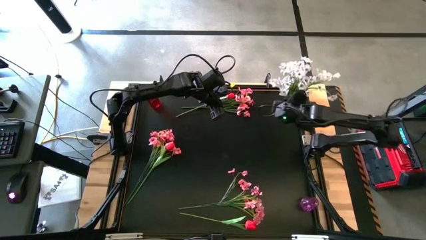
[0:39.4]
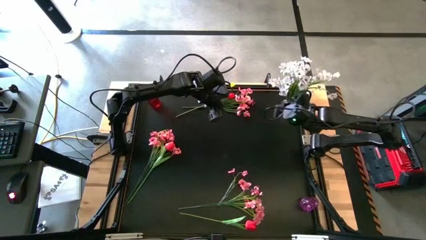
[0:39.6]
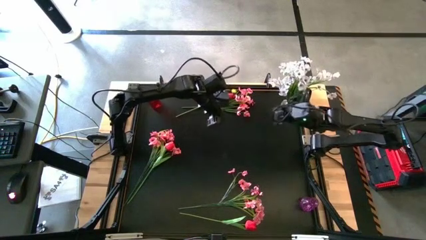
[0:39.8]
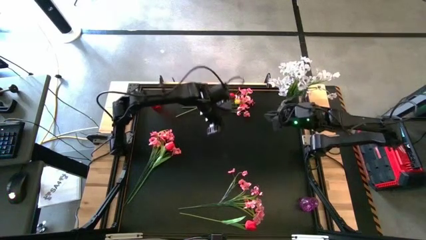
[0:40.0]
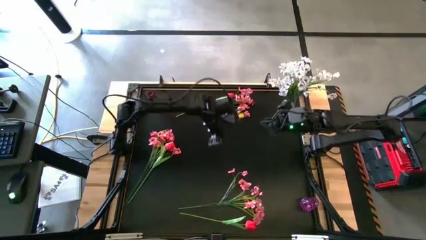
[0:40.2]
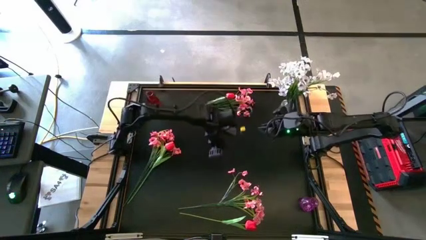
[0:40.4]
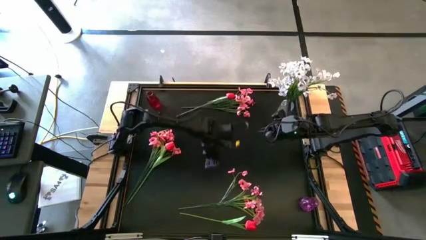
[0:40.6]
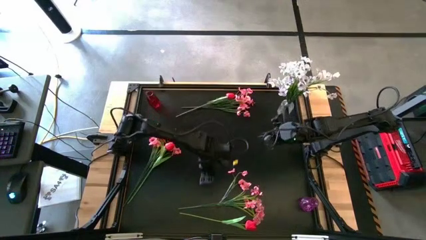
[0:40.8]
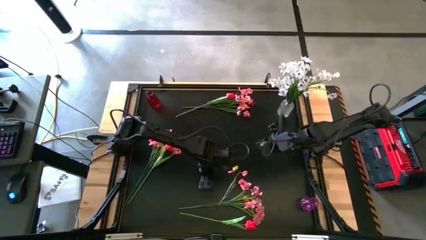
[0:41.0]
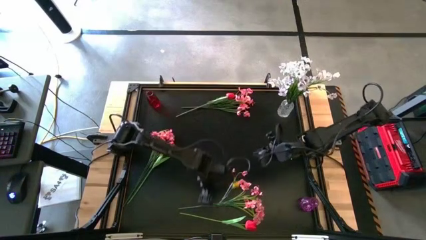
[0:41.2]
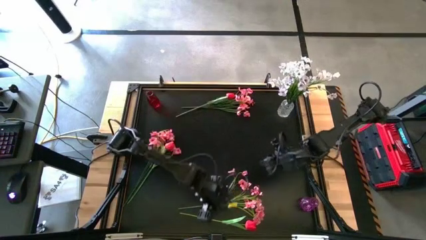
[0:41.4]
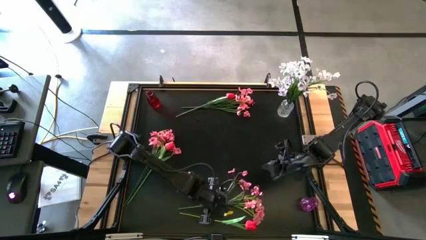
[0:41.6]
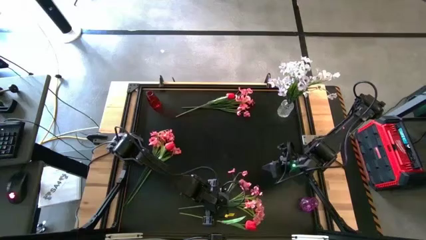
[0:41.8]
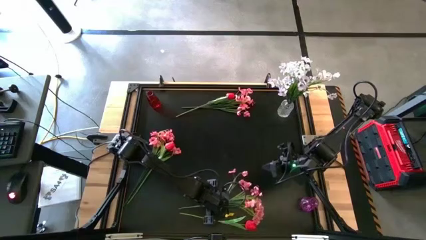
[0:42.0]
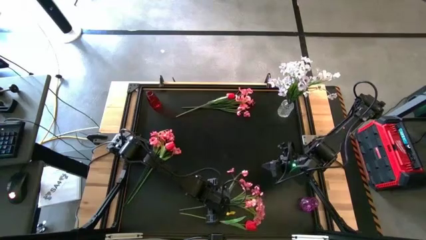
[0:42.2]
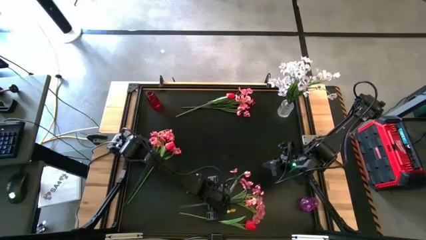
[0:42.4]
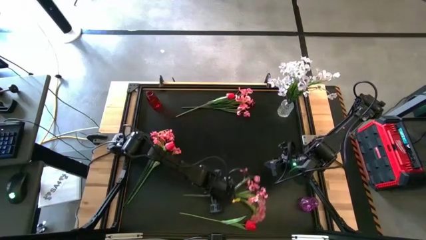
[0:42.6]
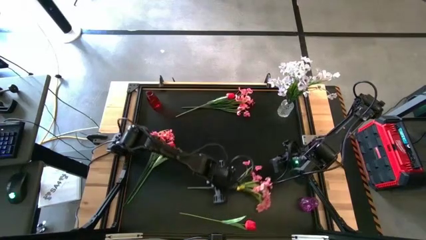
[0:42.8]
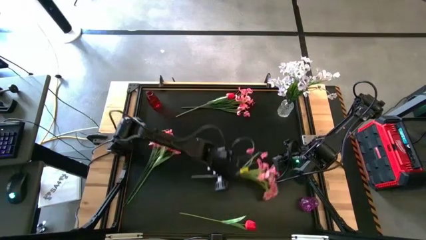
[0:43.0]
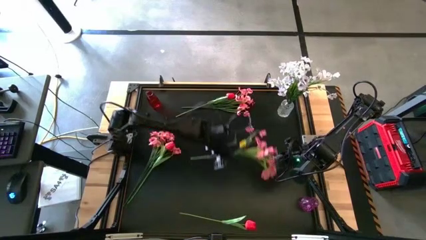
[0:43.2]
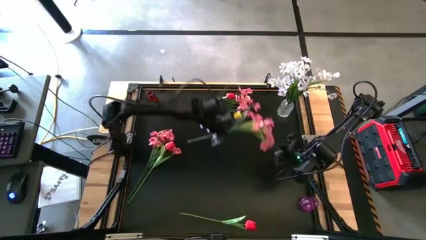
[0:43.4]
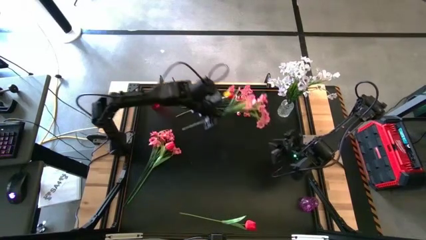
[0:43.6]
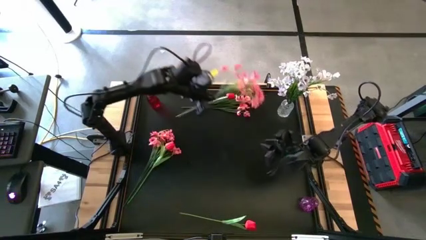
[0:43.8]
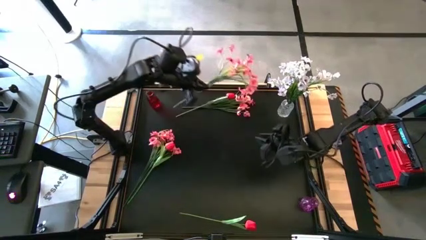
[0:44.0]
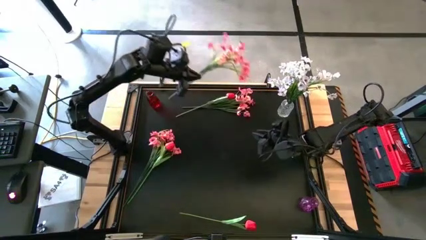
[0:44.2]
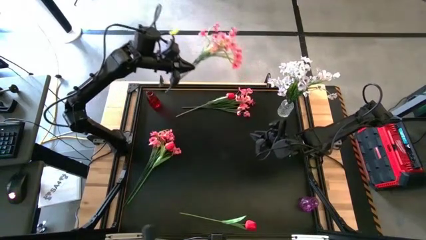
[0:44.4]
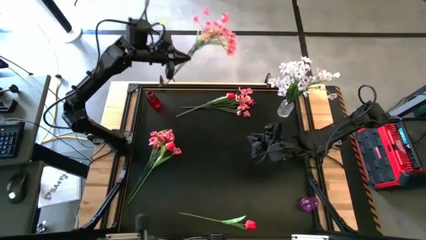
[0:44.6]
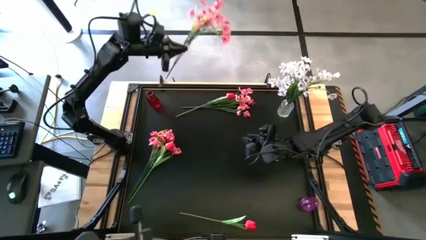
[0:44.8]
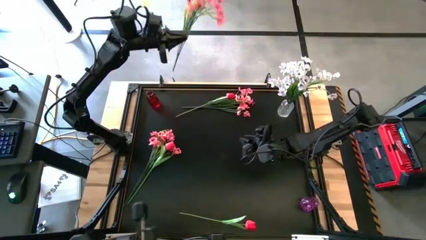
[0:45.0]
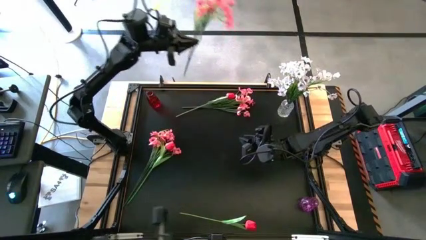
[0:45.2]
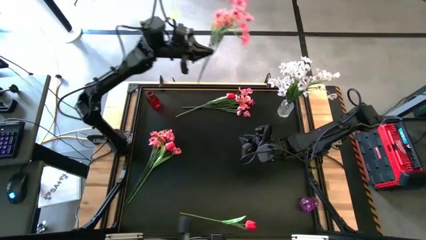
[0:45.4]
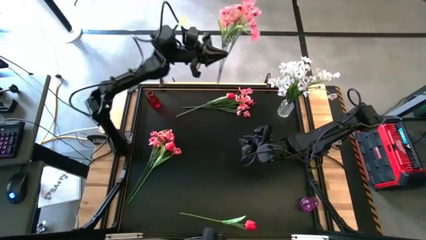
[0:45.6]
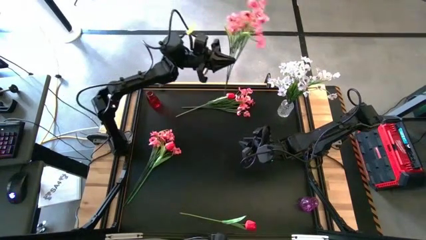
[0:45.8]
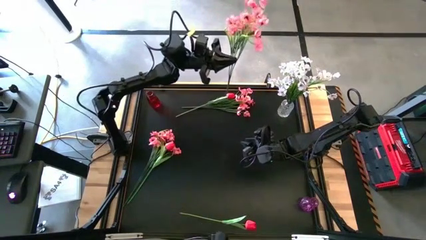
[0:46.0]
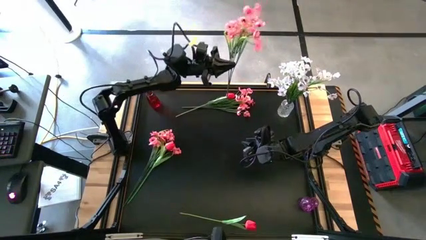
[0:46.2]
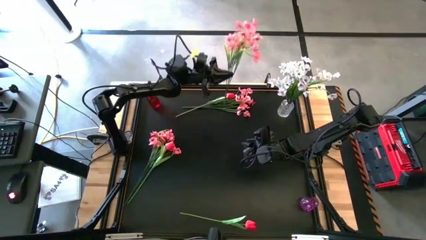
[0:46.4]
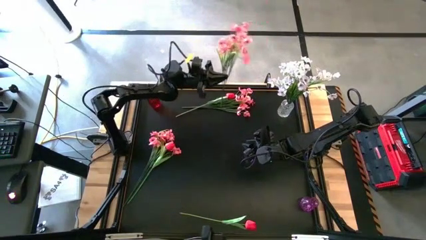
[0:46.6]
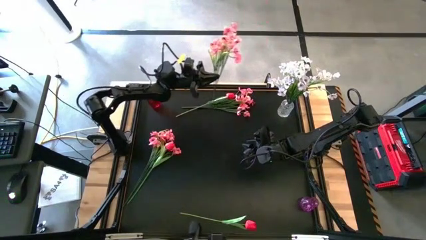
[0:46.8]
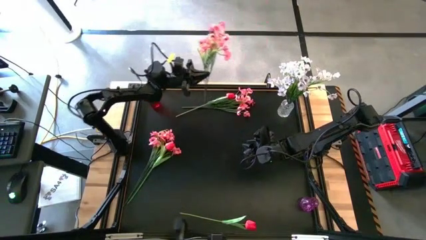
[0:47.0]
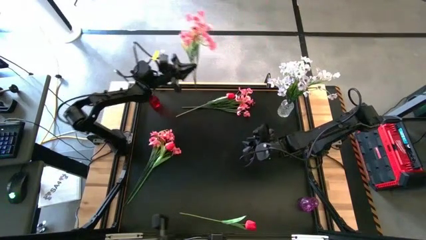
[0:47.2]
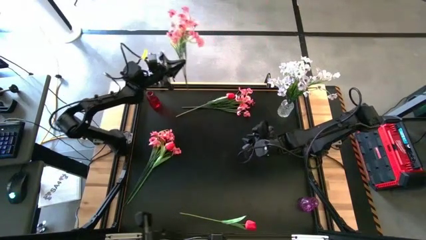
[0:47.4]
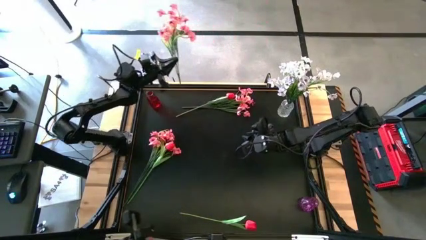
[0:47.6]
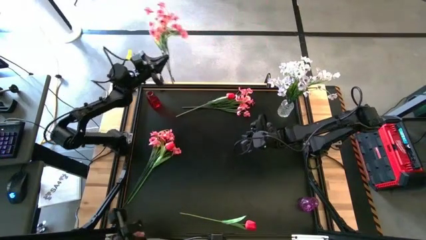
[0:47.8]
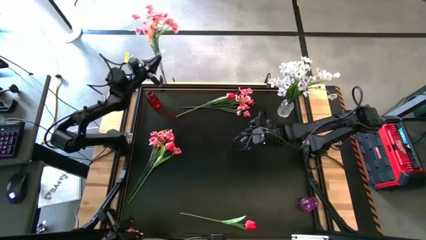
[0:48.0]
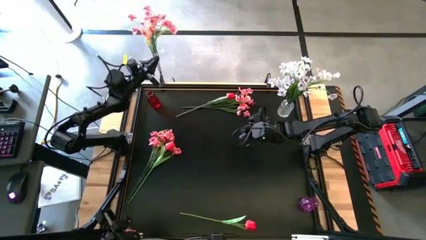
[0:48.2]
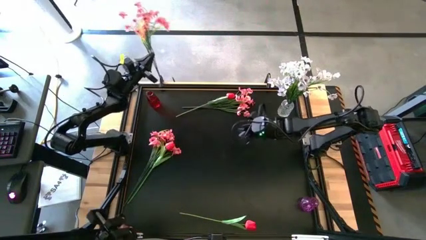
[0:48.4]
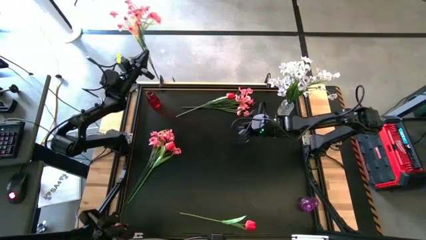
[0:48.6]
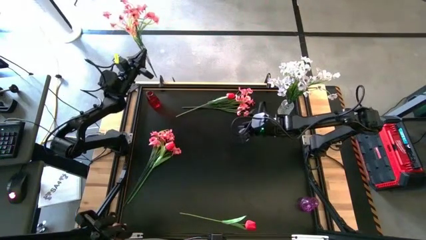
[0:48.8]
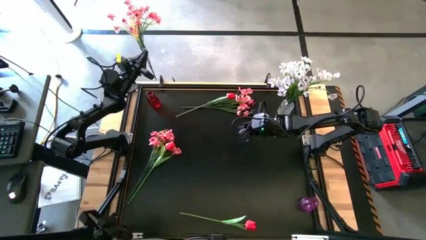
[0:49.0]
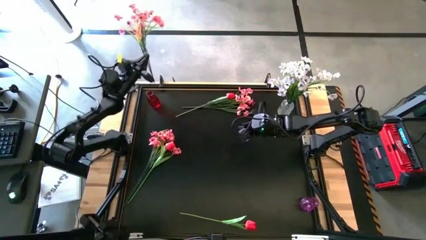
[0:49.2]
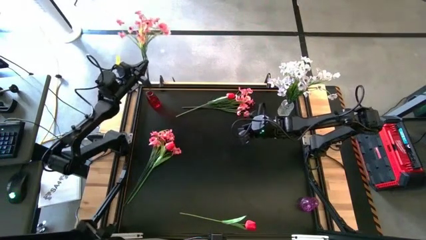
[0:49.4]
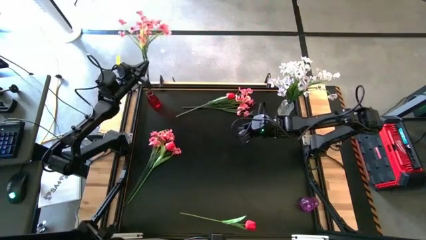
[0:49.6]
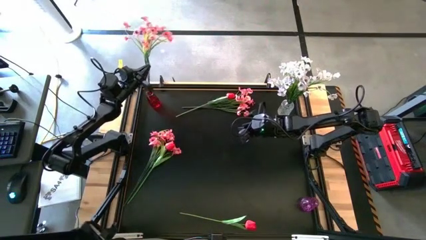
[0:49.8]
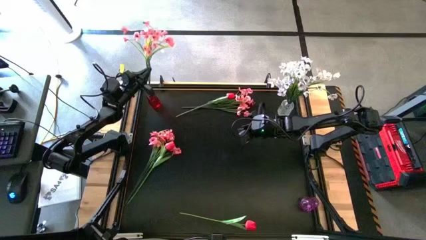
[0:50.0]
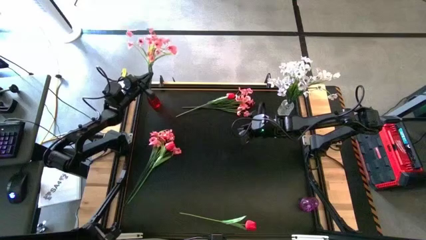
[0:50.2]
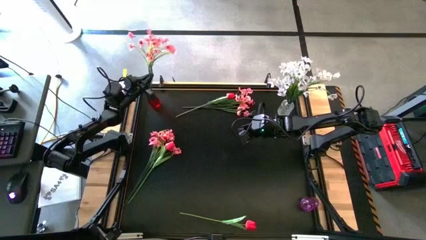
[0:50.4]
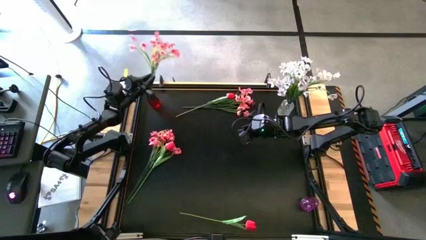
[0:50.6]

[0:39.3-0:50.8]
Task: Sort flowers into vase by color
Put the bottom pink flowers into the red flower vase
